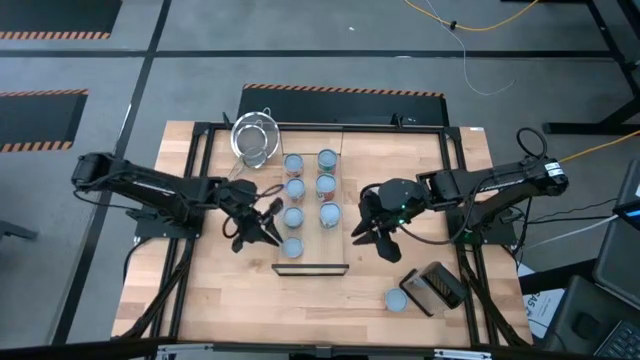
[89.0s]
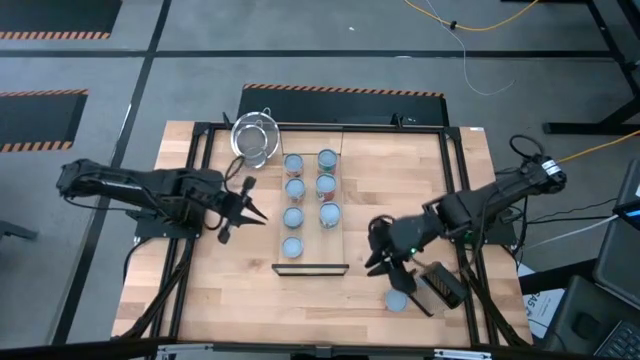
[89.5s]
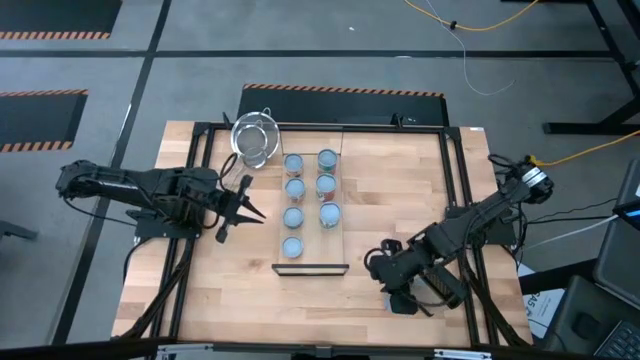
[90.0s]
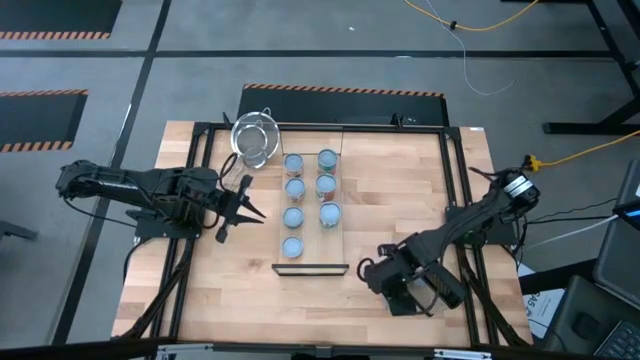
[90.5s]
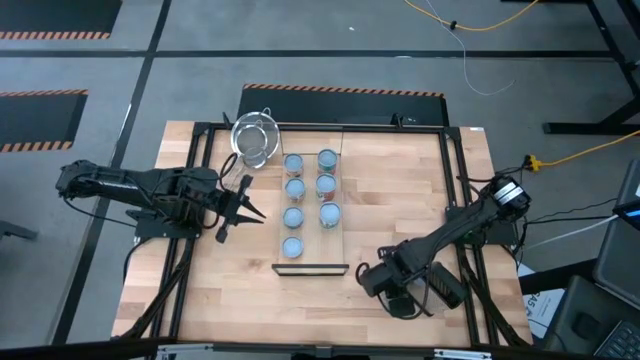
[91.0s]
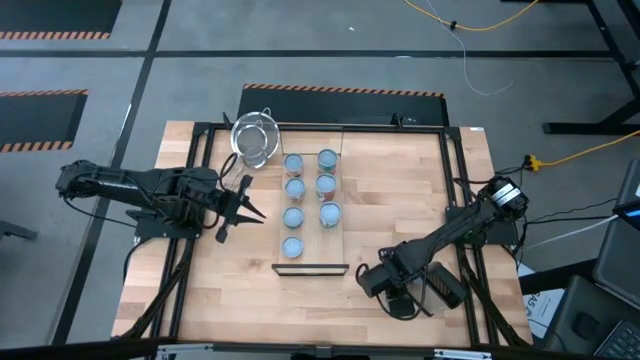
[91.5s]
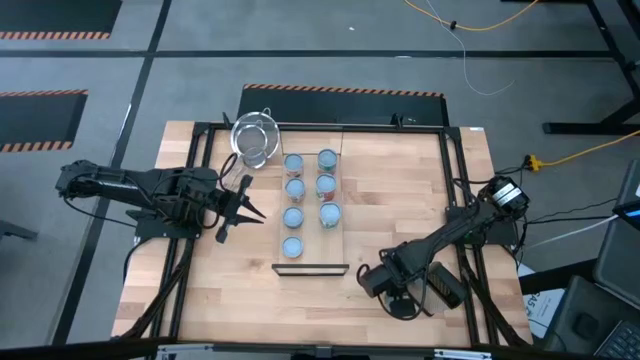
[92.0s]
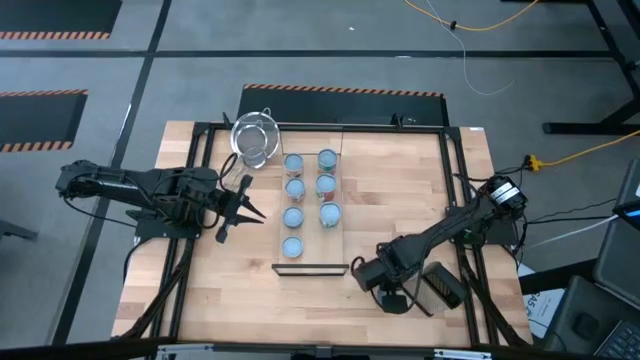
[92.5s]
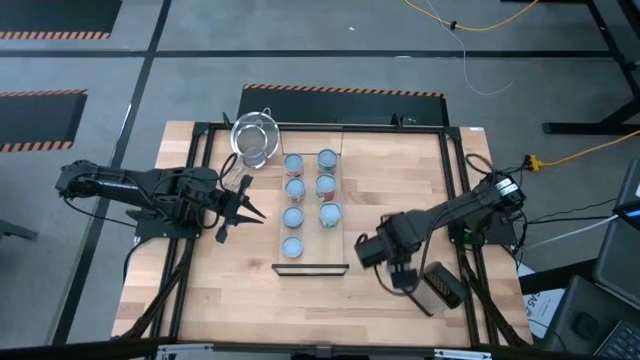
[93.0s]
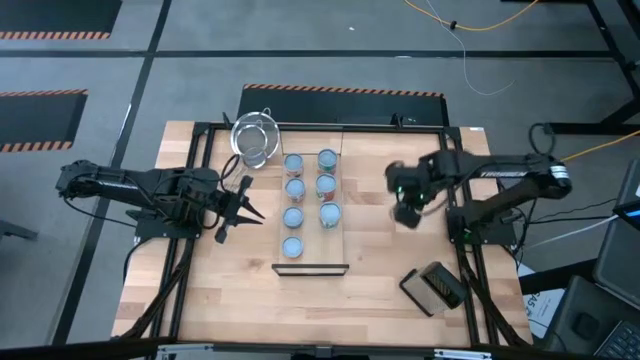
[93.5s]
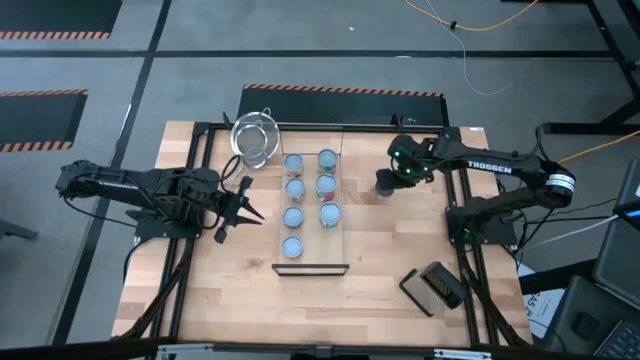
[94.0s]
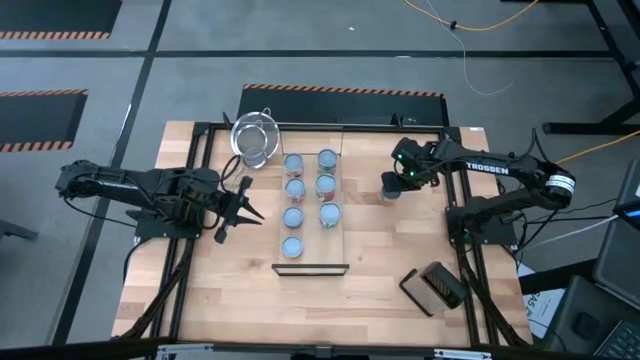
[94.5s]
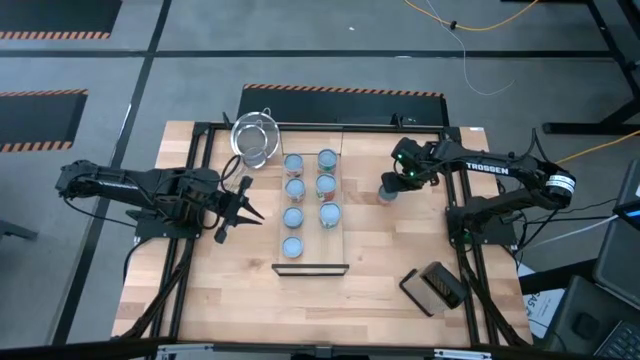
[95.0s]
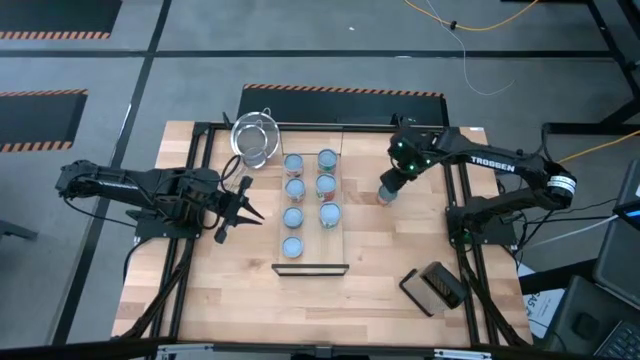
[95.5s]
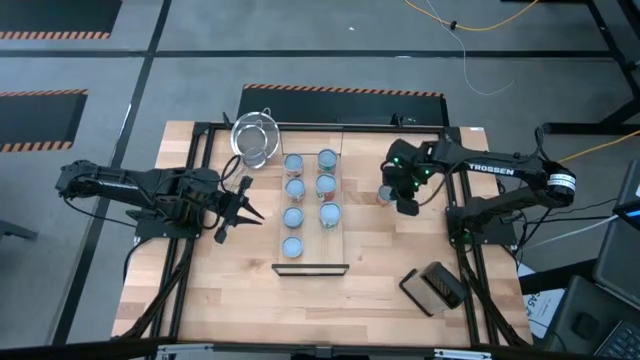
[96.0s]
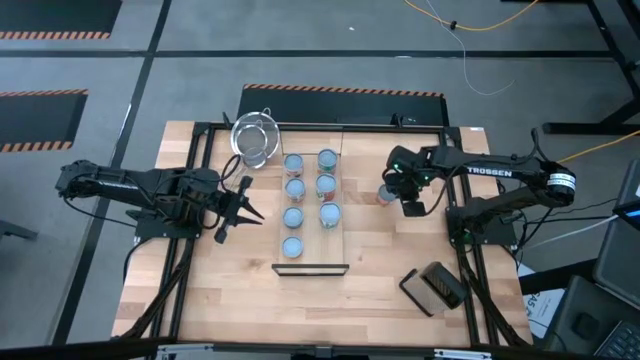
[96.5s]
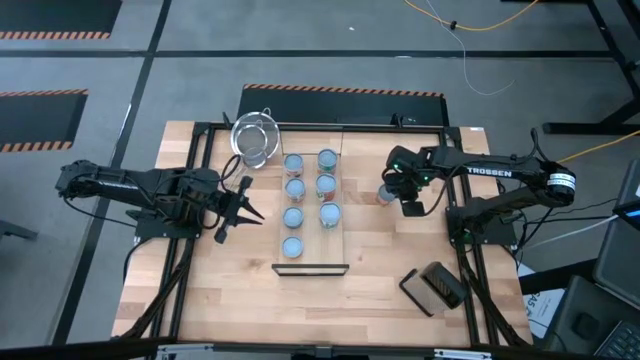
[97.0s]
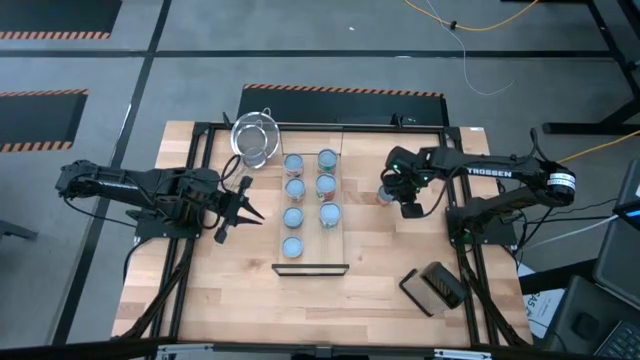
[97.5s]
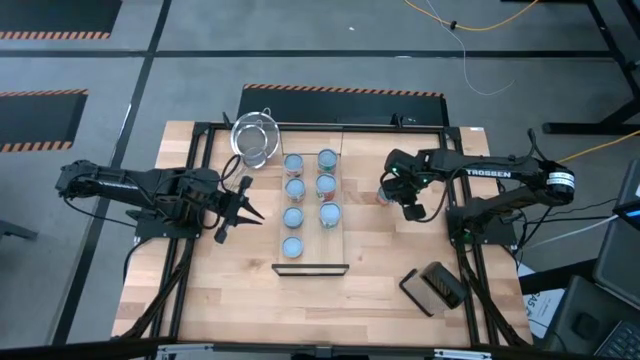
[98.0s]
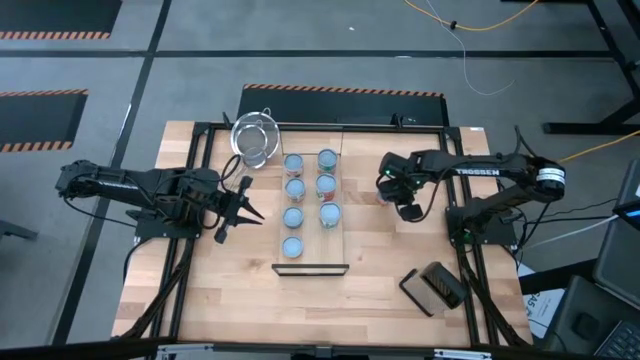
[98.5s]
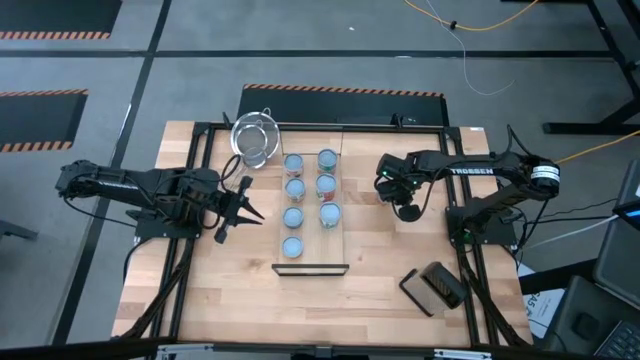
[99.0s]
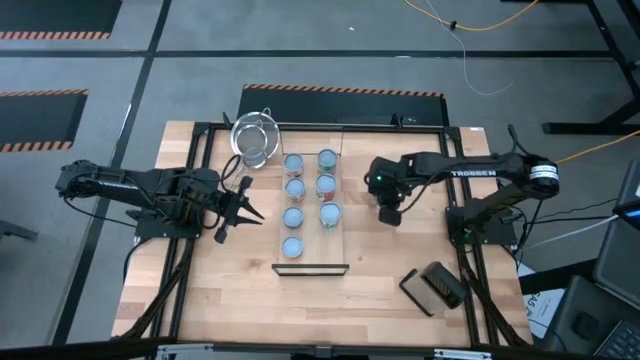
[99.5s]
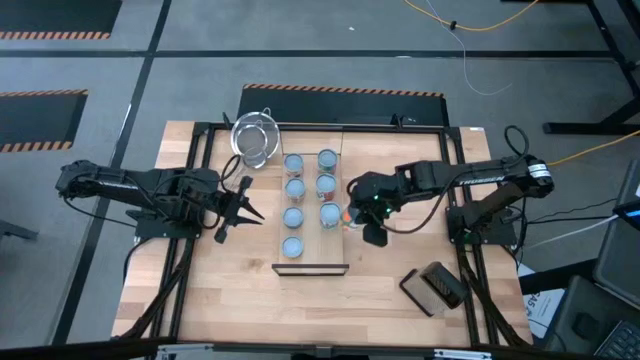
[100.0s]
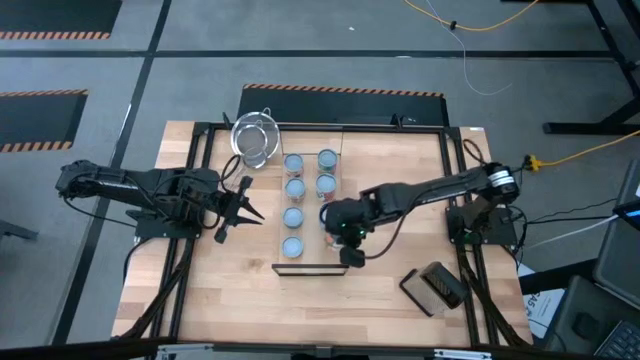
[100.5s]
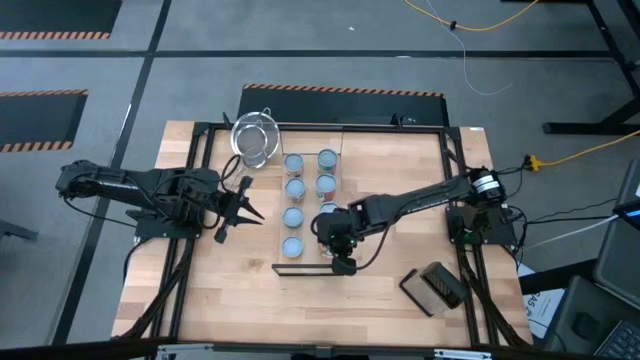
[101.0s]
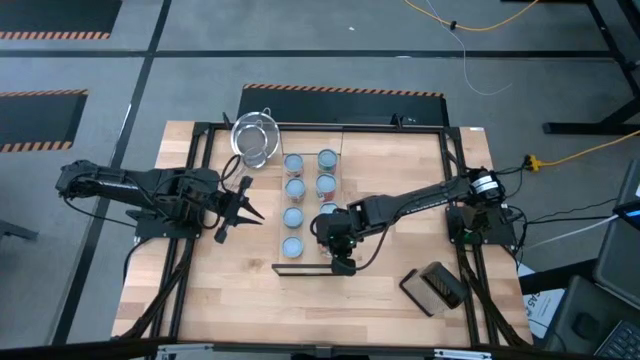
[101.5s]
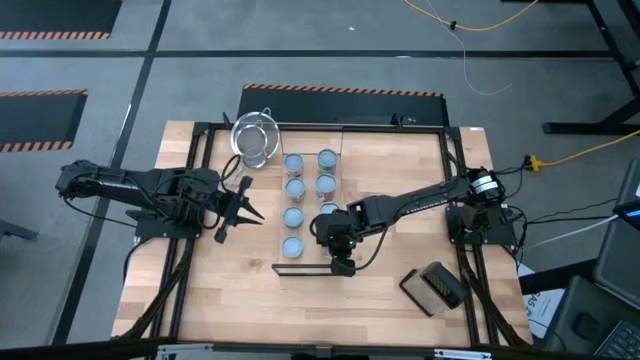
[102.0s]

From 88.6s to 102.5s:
Task: Pick and place cans onto a shelf
Put the canned orange on the shelf

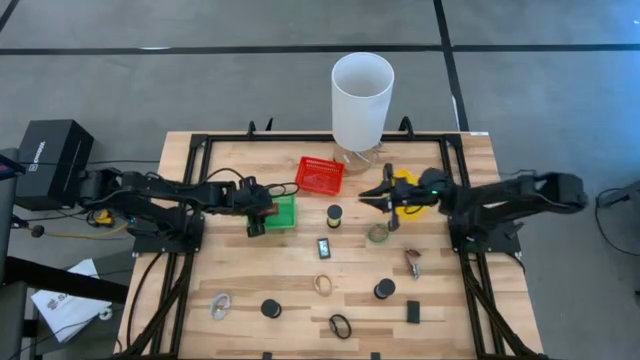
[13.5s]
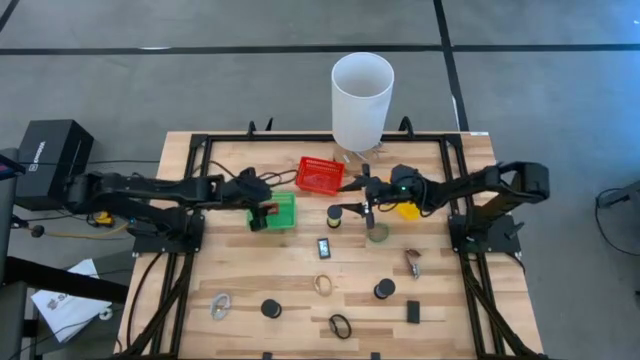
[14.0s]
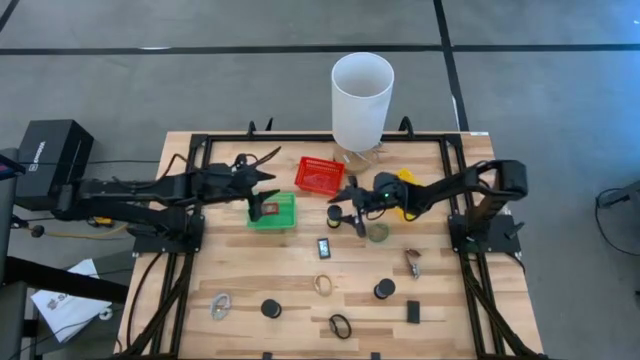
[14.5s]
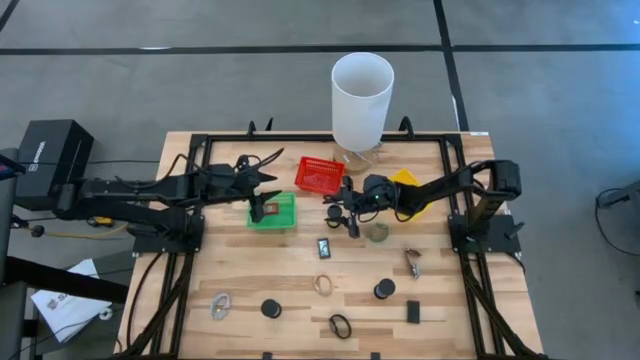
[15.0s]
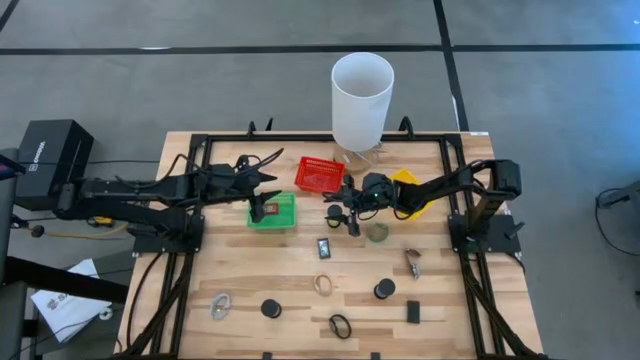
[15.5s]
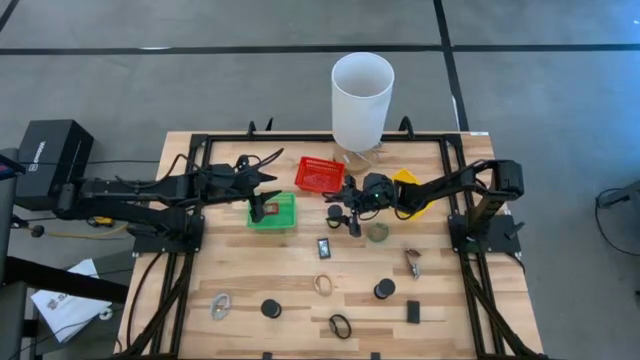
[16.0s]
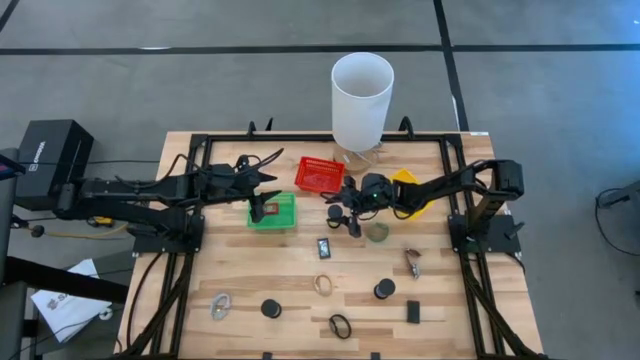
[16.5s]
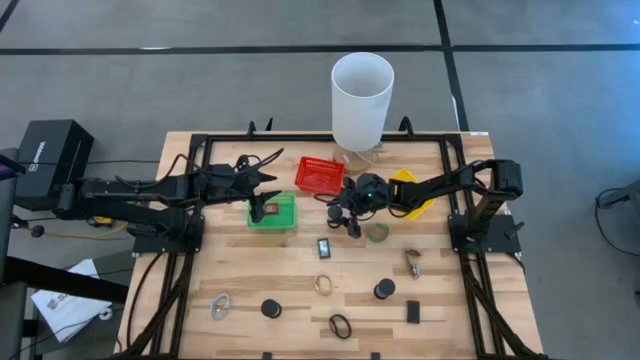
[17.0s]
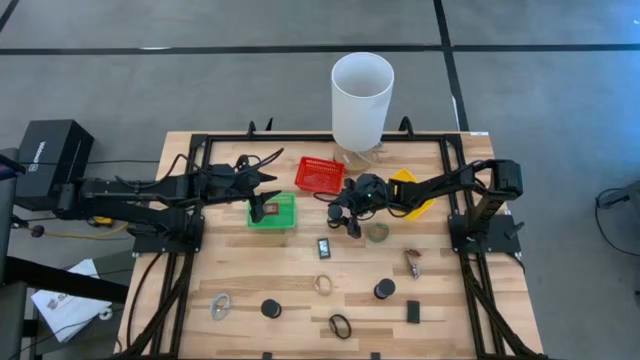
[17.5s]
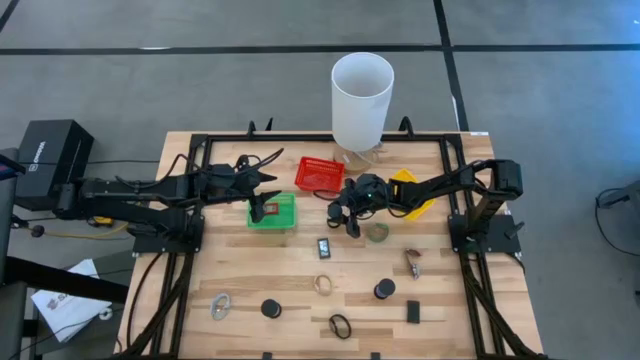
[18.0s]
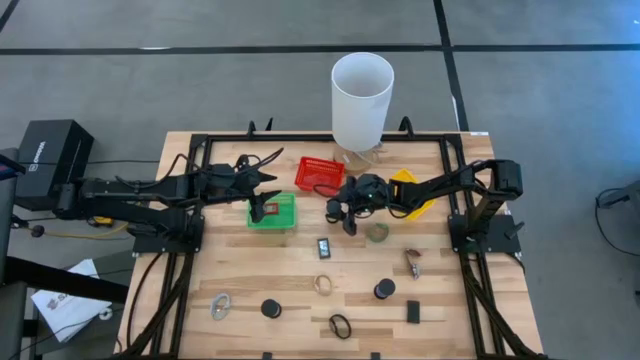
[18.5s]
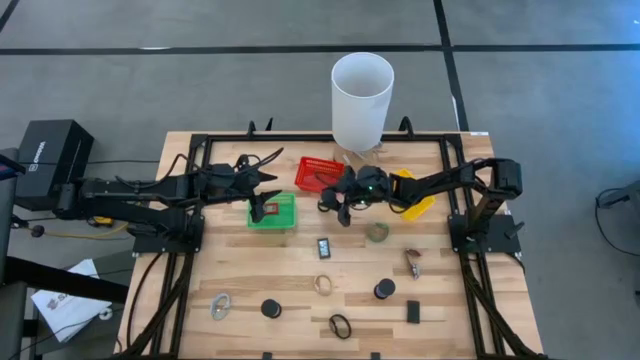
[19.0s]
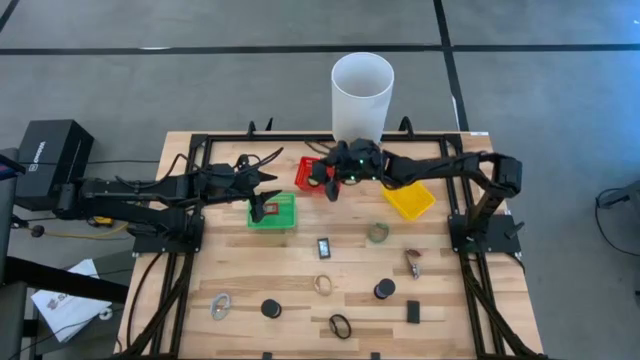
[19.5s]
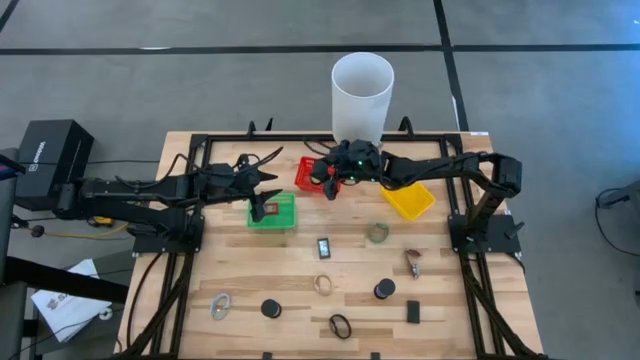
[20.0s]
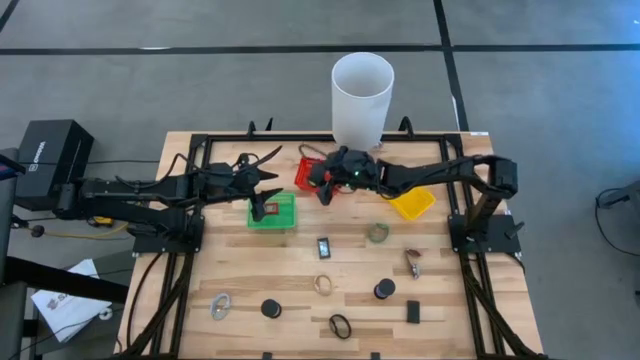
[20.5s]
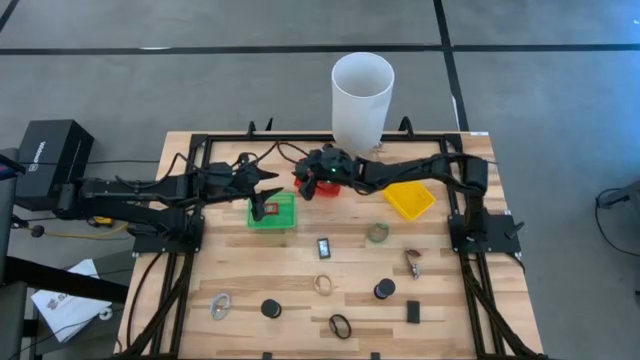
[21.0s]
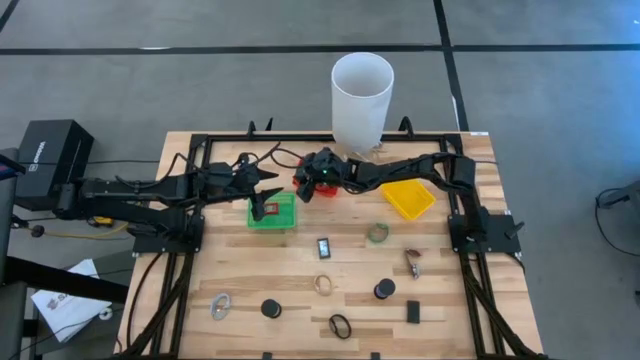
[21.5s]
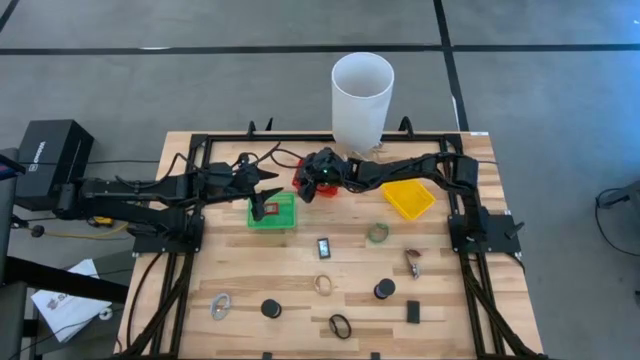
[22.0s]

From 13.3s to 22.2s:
Task: Pick & Place Office items
Put the top black hourglass into the red bin
